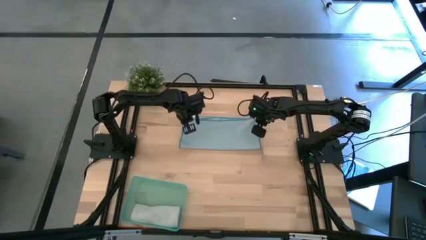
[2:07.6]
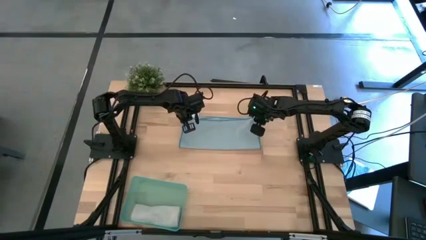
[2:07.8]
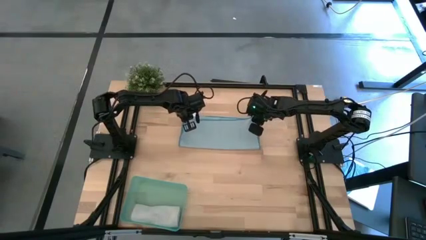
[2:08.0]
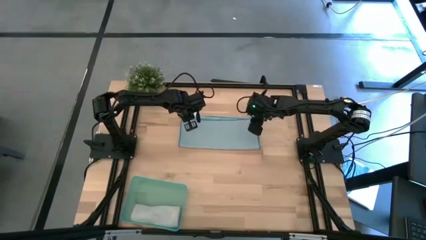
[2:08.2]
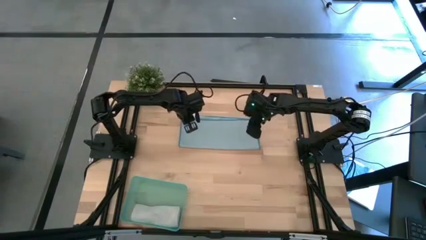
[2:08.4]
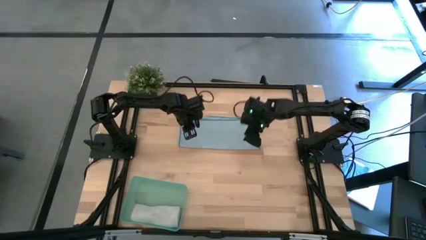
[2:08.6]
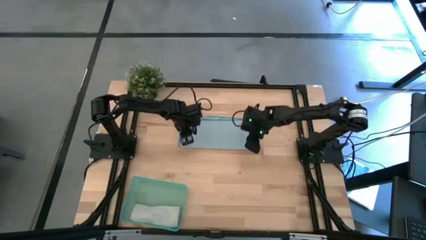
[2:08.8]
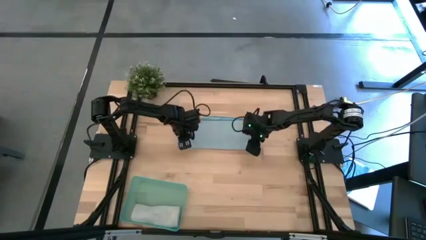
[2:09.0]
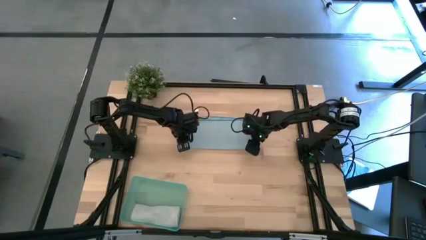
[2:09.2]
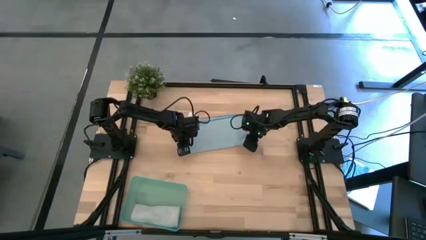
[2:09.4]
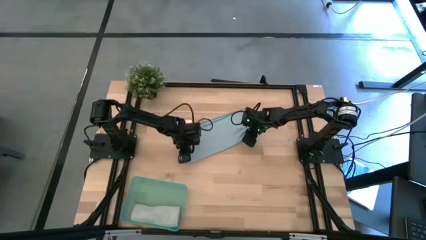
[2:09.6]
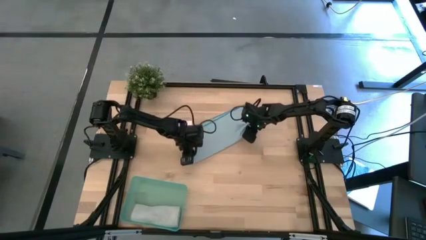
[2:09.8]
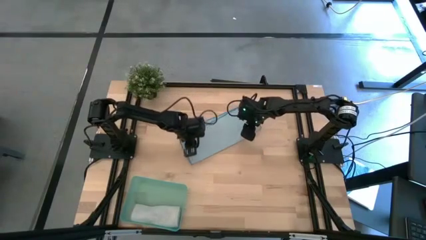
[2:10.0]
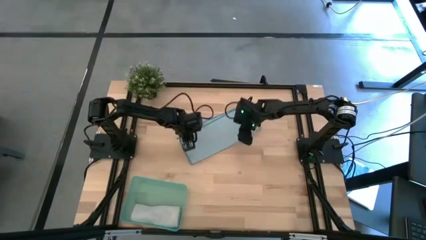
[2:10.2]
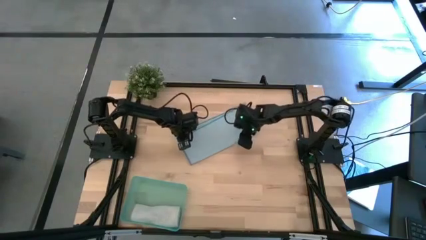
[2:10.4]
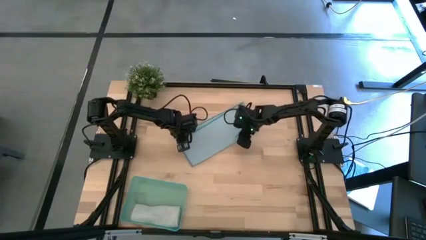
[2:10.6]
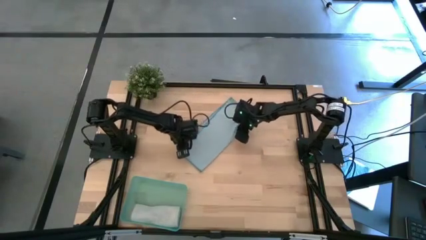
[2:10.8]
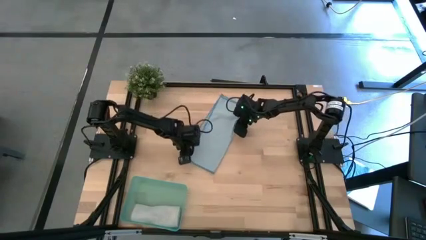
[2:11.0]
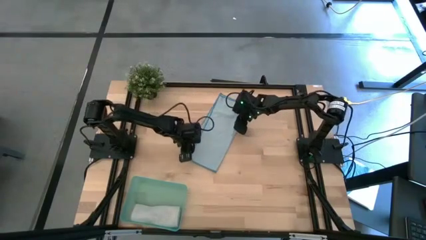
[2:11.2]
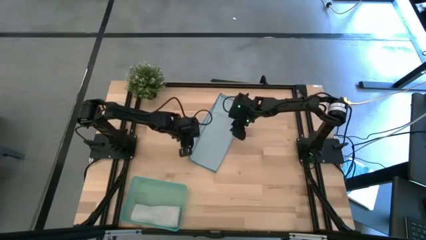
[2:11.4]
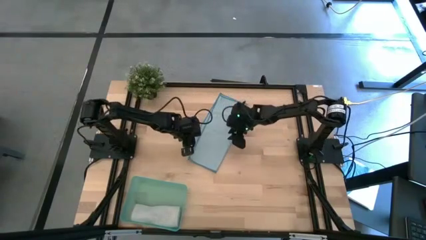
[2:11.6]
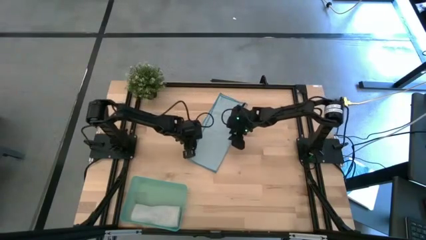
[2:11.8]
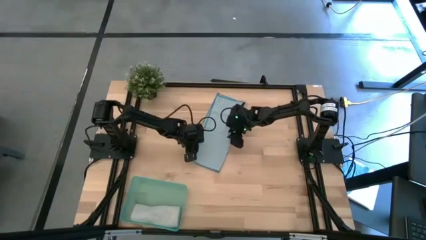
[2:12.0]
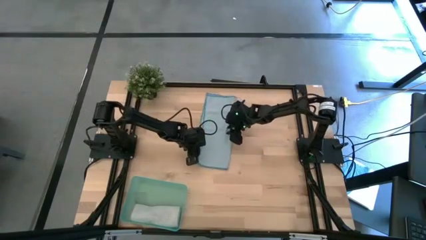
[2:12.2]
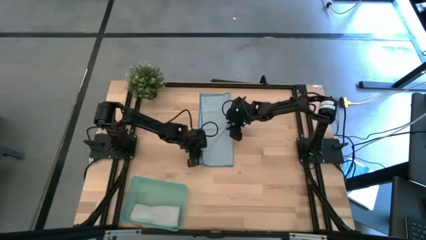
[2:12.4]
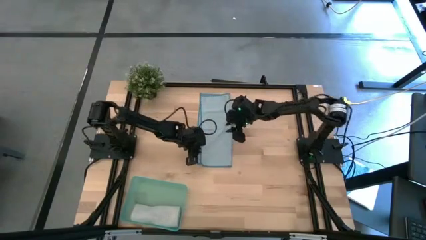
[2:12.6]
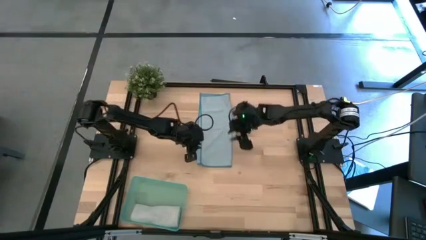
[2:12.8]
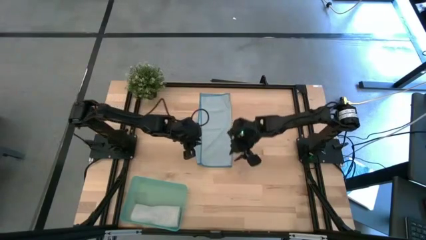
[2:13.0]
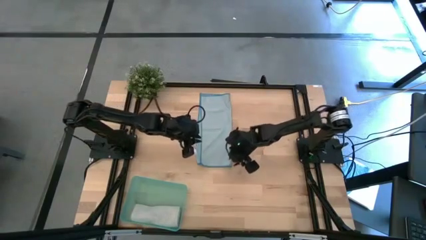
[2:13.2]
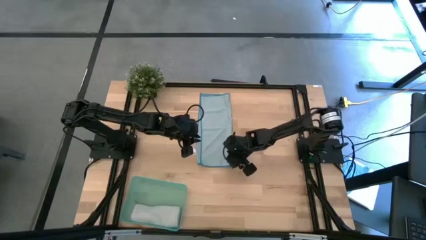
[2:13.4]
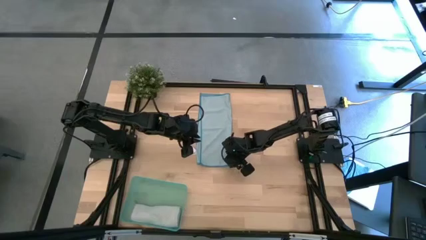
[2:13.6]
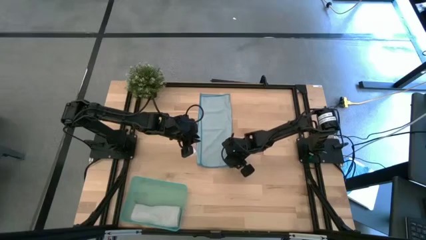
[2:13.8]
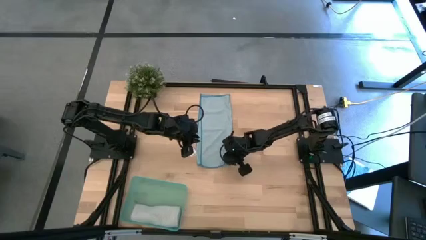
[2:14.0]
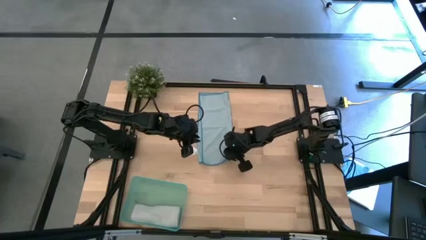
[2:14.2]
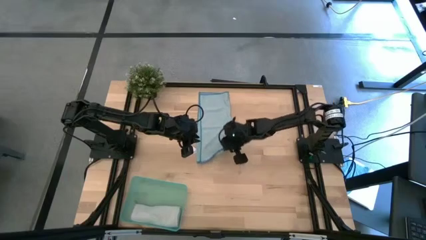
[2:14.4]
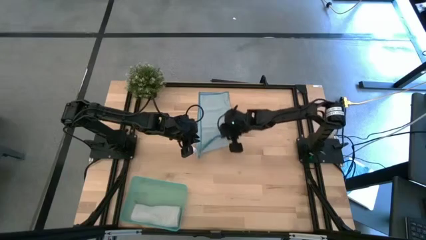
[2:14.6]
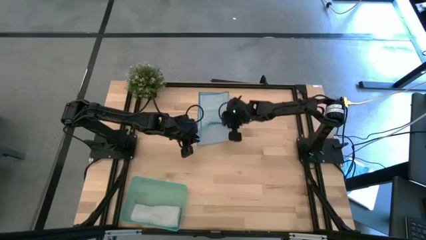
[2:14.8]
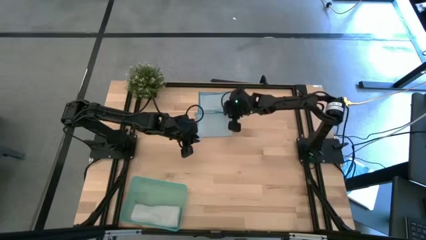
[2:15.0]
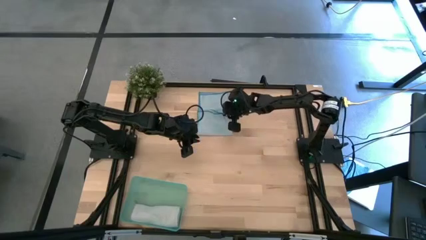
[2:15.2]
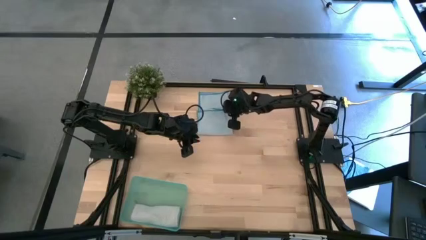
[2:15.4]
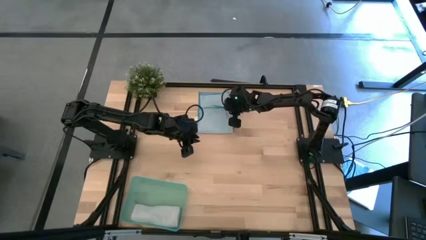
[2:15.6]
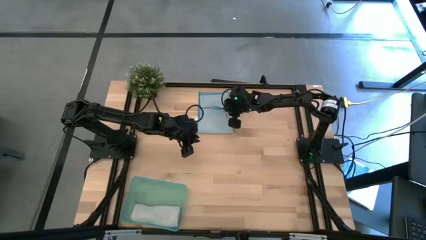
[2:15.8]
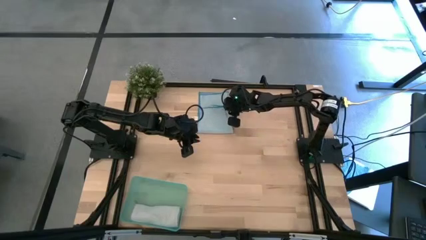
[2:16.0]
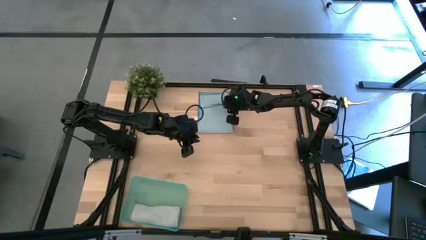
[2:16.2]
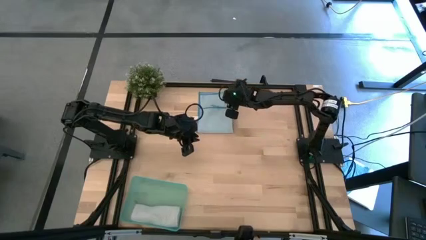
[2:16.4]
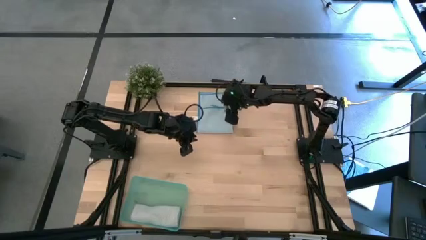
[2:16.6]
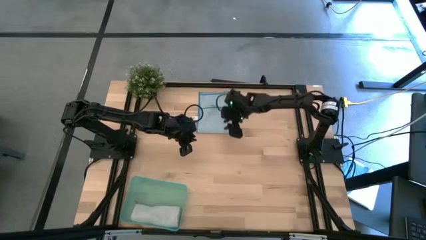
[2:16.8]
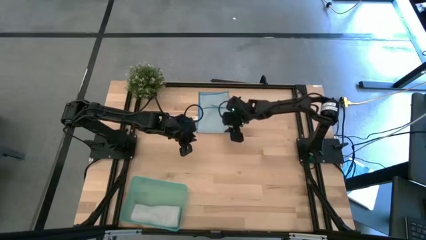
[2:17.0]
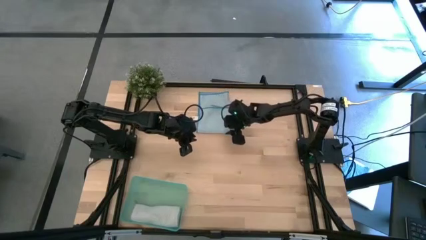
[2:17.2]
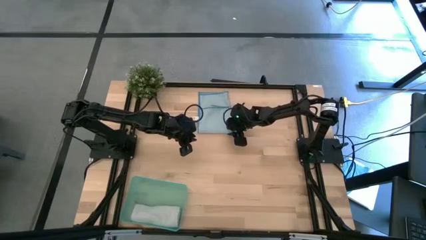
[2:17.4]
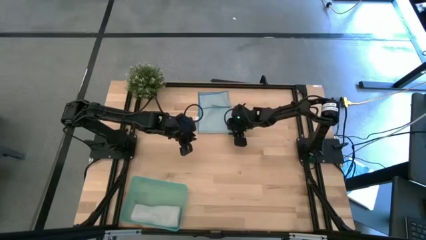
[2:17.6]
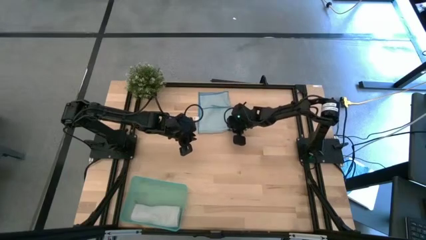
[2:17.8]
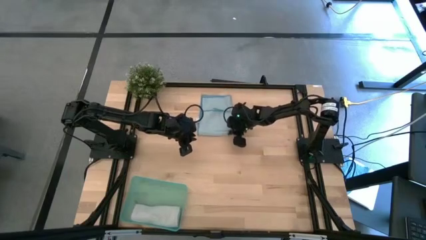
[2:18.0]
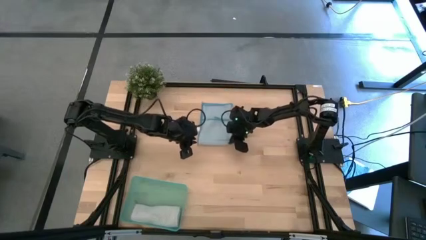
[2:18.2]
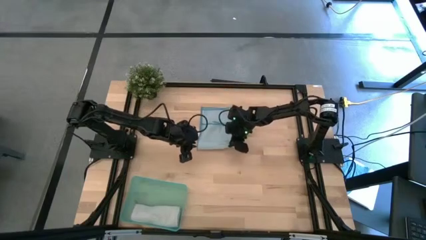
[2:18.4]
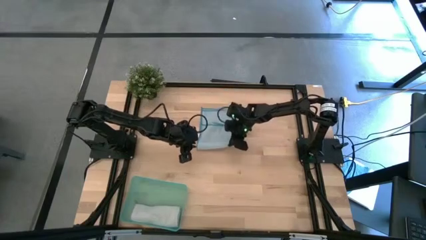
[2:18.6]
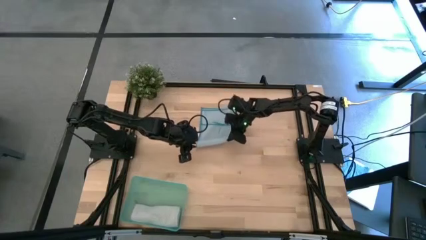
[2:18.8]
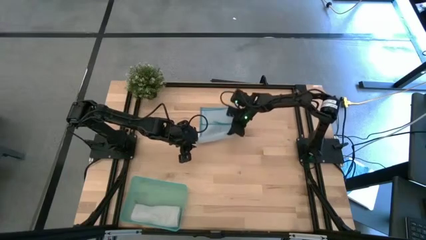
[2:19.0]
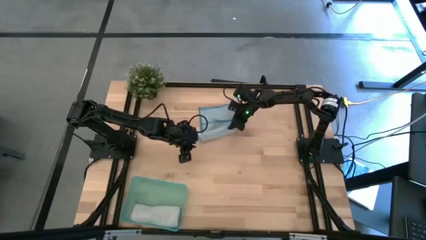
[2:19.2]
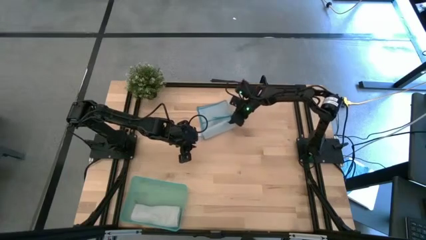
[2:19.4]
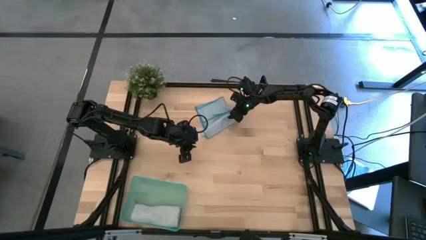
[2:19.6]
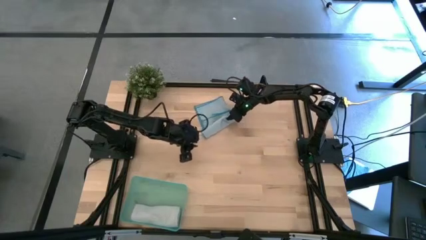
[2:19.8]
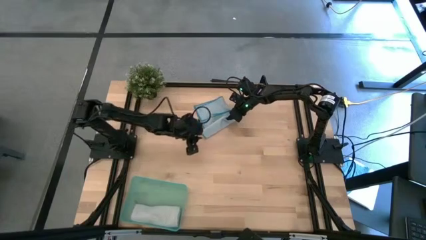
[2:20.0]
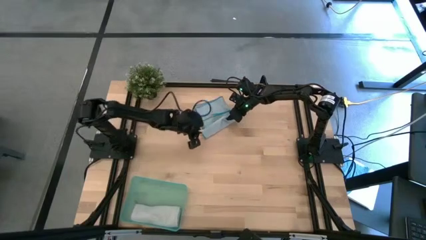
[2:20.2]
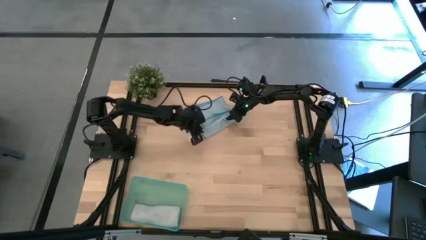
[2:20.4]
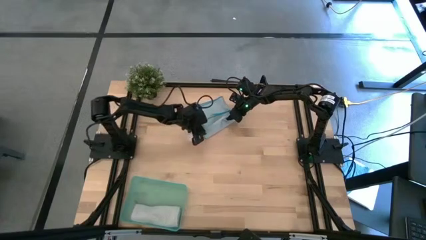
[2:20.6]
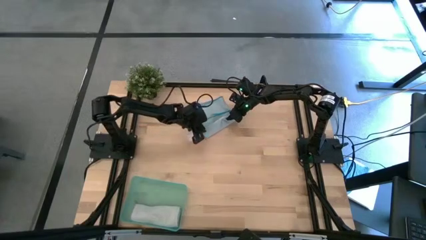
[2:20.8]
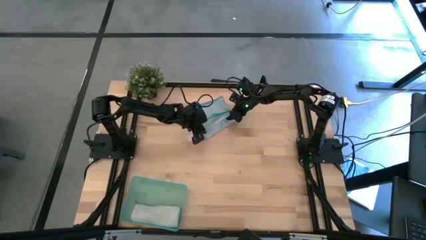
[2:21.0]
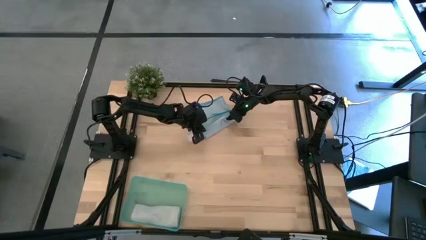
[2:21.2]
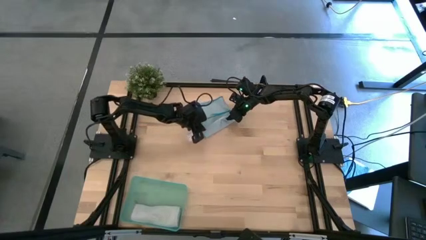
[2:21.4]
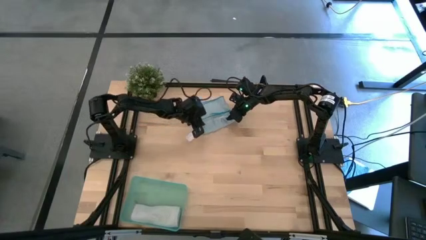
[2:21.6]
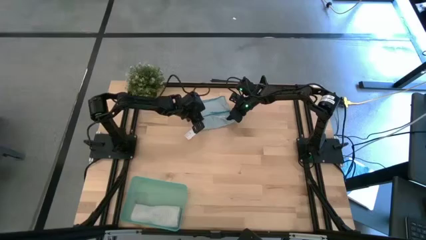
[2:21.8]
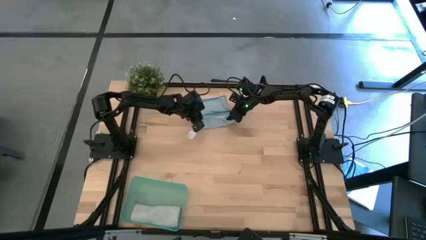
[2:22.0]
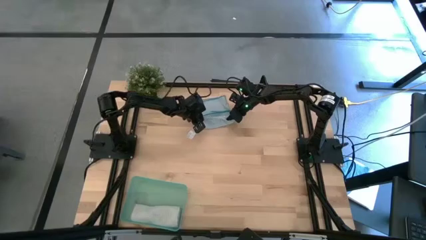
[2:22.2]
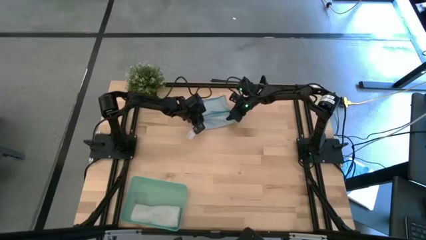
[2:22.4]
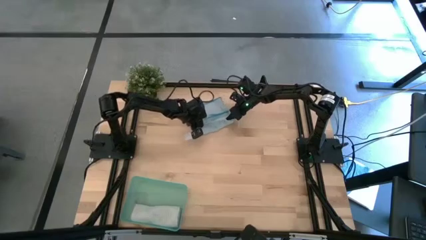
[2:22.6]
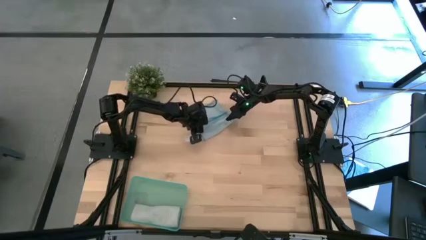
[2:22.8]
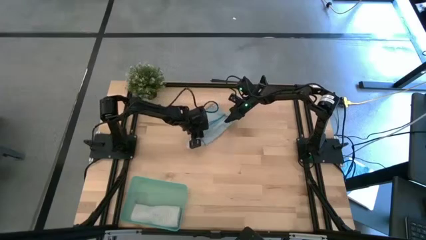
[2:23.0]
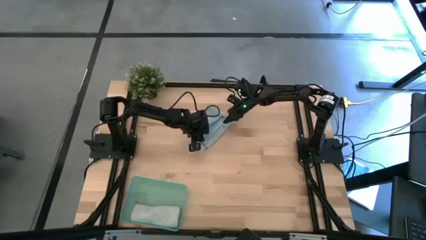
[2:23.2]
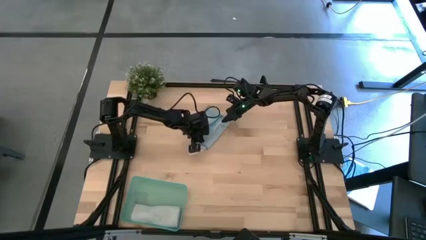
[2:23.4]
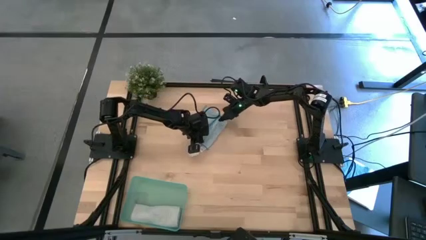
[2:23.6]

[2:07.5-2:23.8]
Task: Roll microfiber towels into tight, uniform cylinder then place into a basket
Roll the blue microfiber cloth
